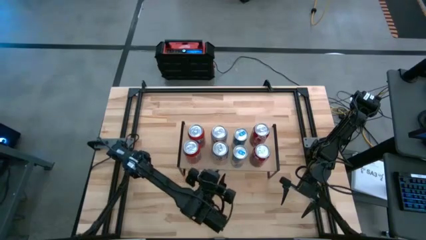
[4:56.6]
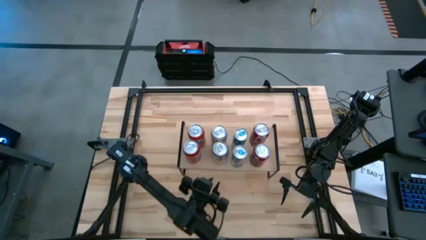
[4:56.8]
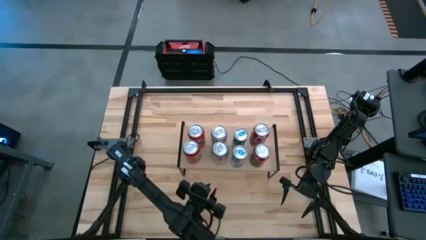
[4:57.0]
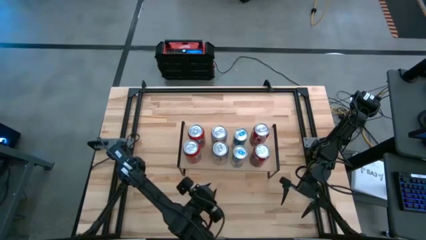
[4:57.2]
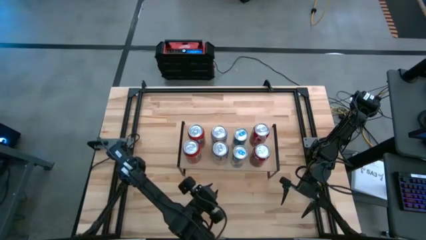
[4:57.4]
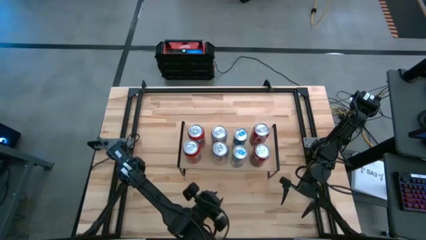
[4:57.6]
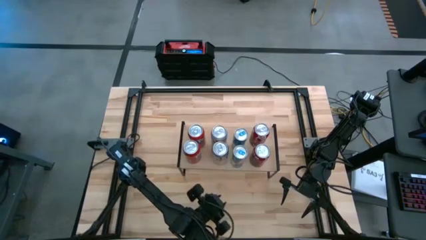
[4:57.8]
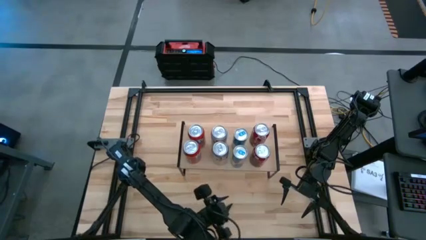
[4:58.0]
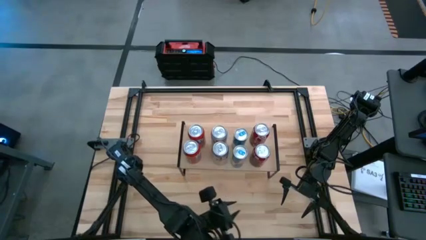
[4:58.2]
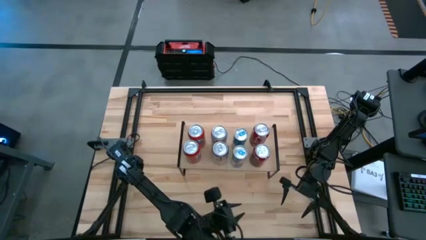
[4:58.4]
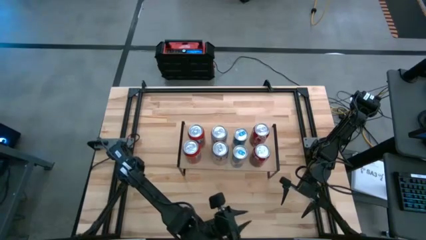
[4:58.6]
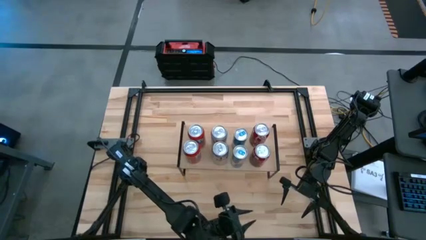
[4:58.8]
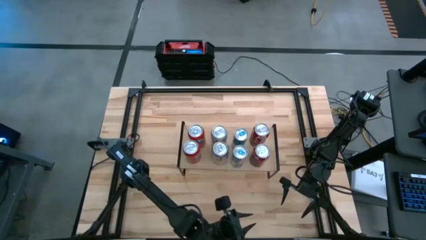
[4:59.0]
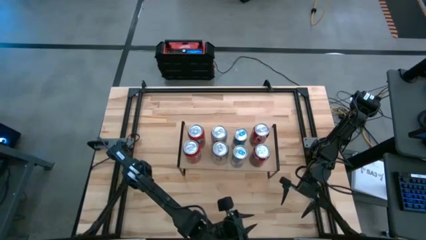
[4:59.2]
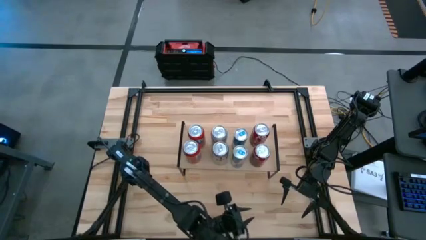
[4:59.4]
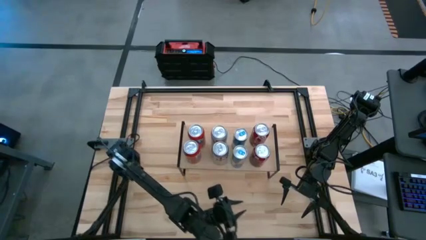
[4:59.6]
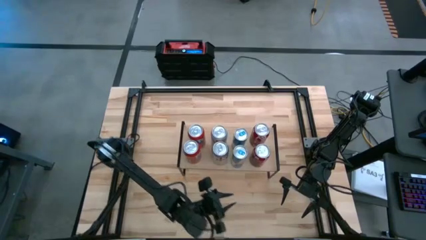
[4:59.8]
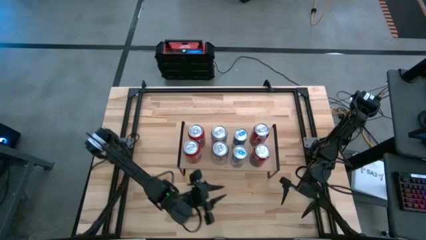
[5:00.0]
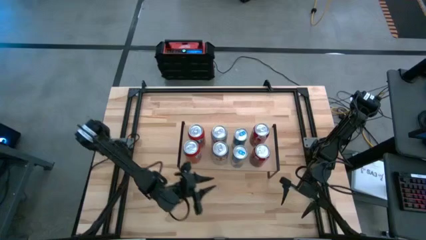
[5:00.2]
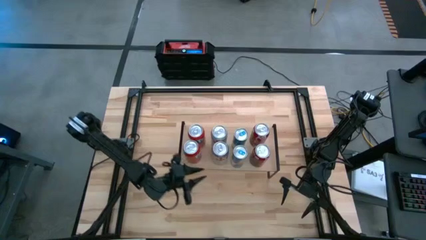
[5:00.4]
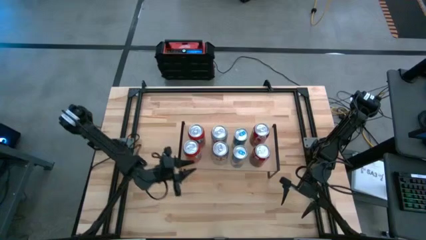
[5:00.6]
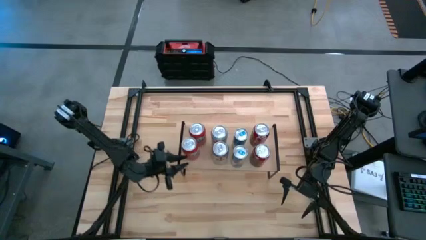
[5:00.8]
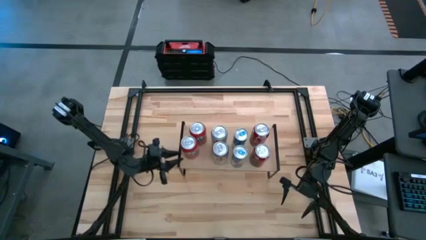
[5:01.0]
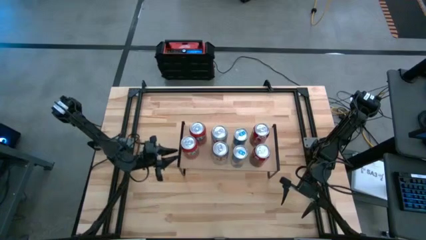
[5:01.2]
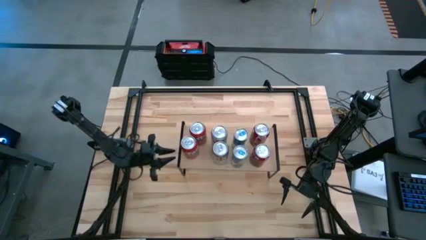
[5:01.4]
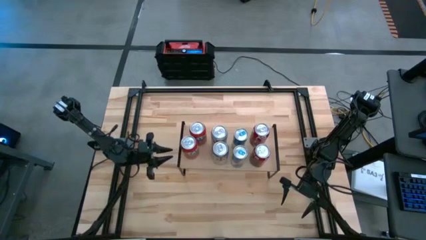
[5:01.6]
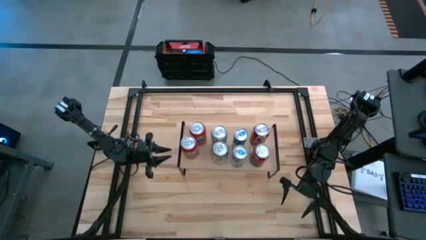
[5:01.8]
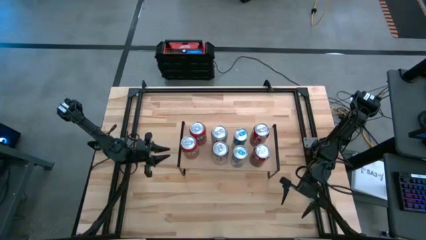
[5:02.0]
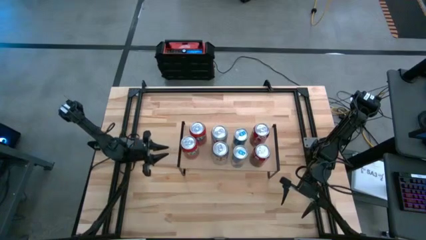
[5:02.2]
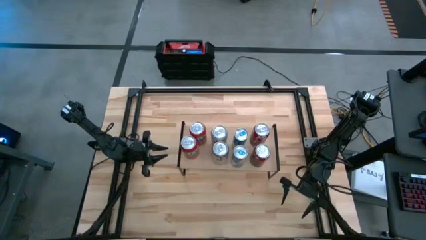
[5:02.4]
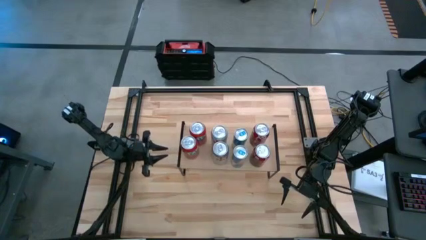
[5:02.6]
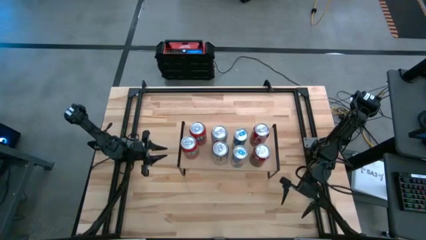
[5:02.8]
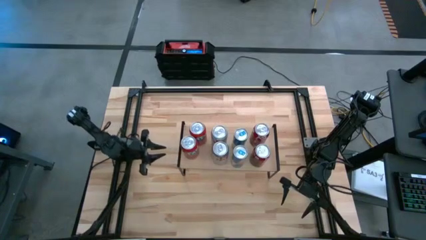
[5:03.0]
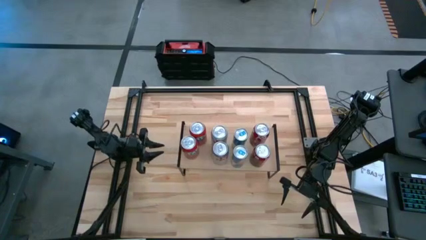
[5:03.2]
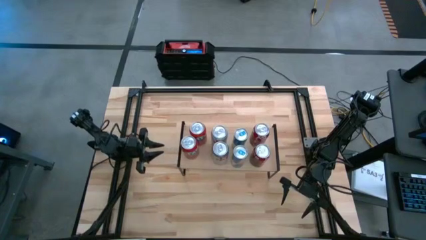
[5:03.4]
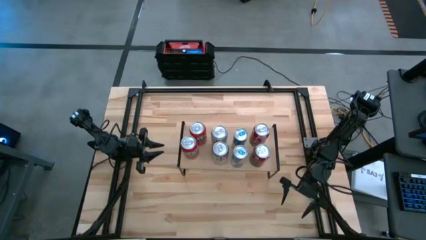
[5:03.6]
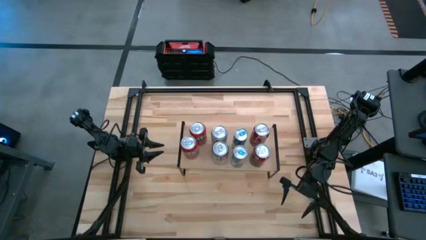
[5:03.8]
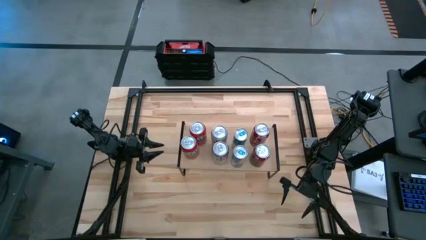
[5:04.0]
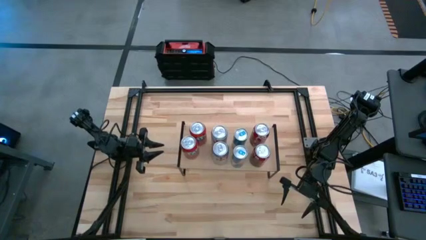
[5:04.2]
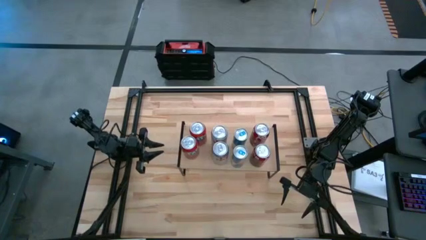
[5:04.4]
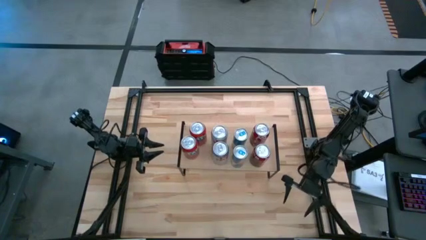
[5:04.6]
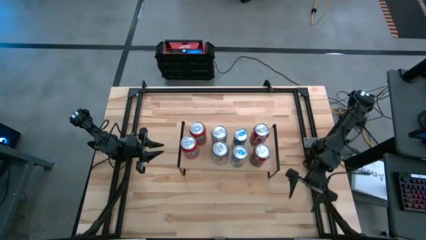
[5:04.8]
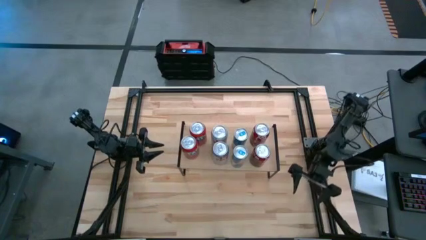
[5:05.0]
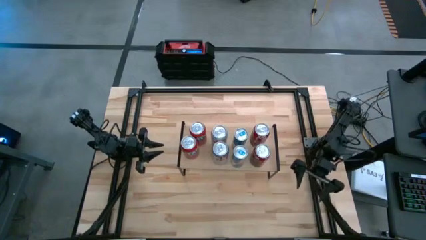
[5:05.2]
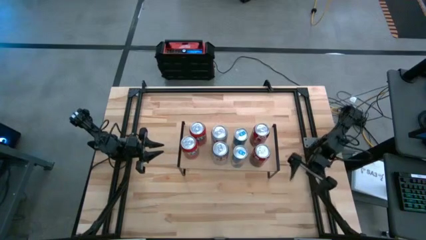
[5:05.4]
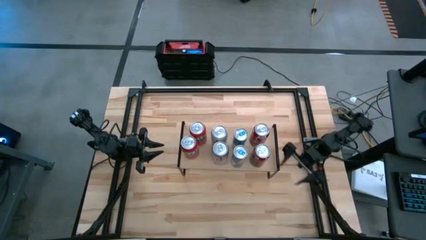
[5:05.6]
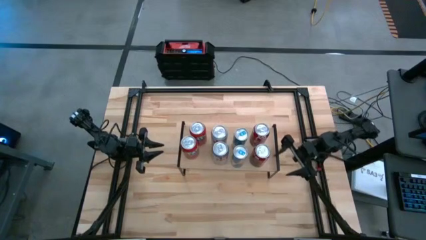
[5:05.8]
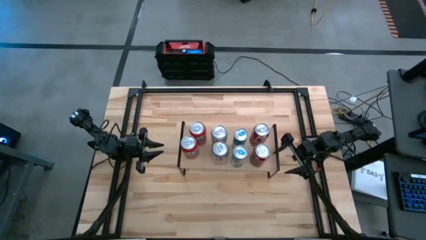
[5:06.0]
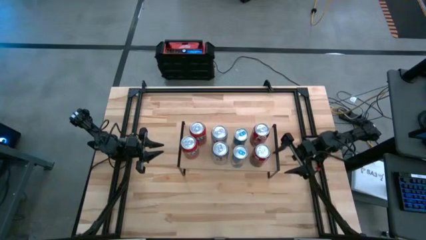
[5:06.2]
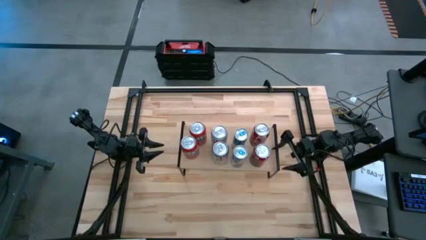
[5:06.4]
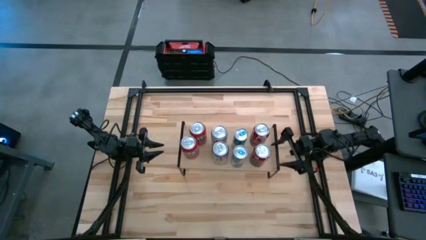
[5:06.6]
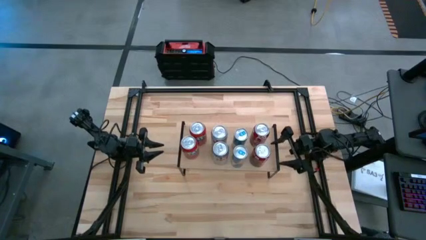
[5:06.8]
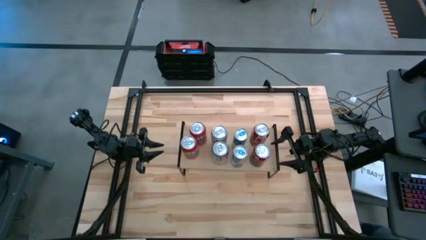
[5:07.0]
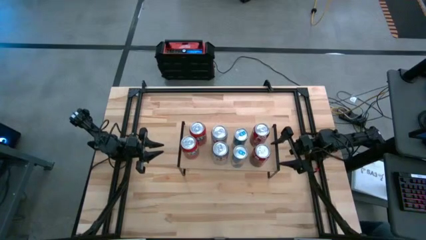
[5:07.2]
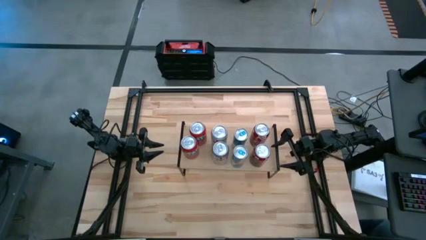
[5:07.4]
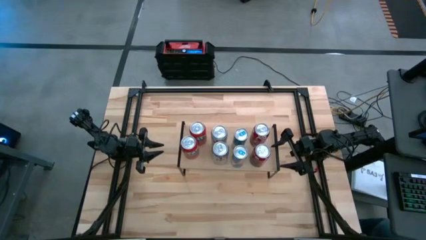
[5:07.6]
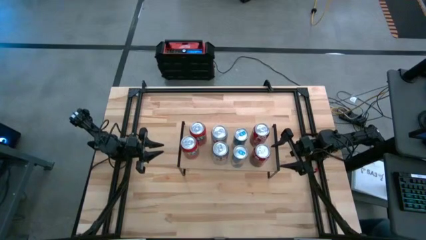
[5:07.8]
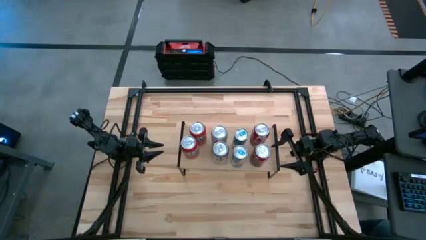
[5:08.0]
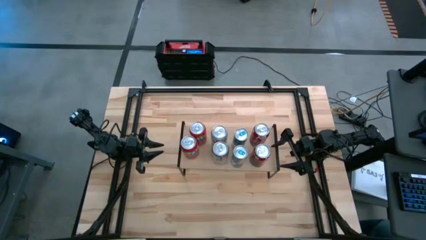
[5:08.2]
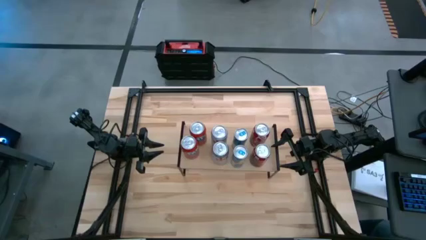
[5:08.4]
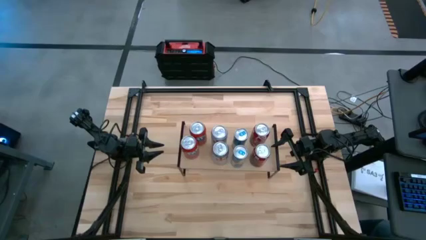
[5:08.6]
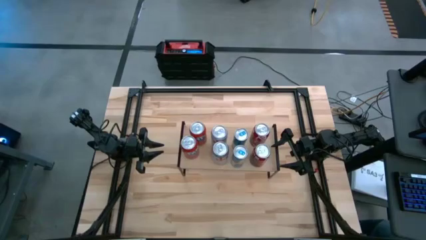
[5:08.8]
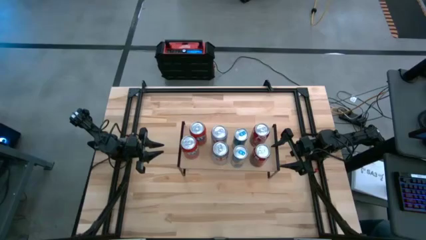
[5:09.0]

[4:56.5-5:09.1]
Task: Place canned beverage on shelf
Return to Home Position

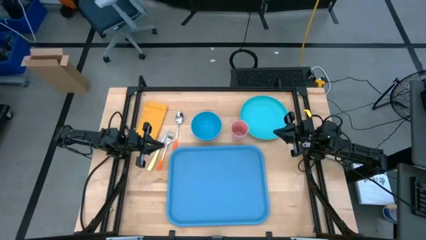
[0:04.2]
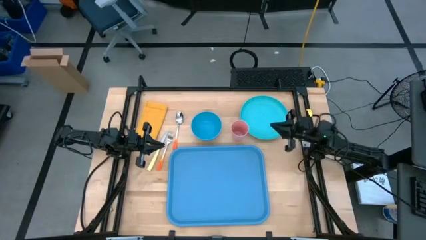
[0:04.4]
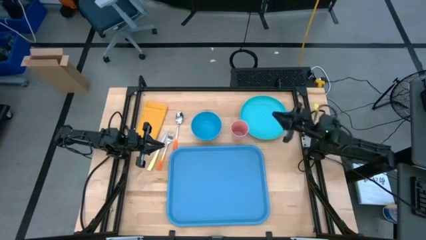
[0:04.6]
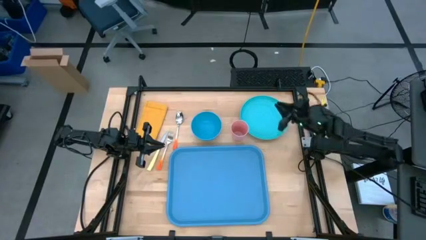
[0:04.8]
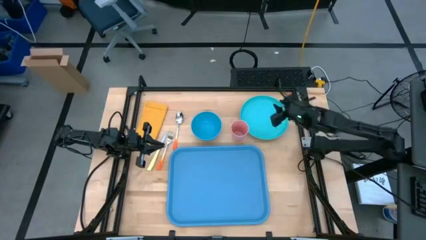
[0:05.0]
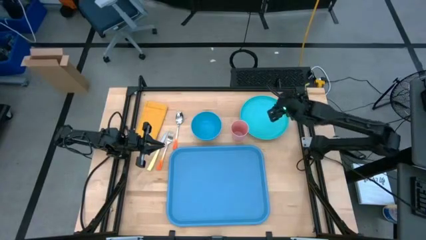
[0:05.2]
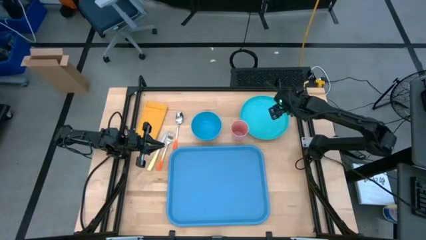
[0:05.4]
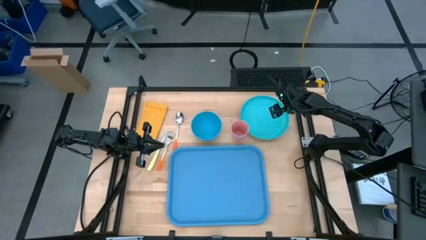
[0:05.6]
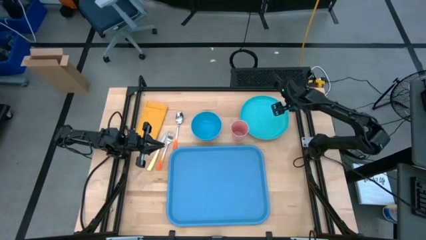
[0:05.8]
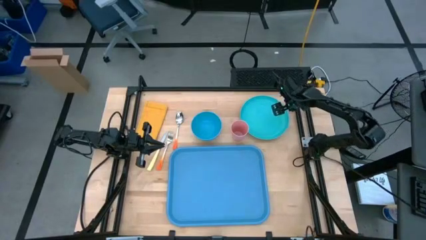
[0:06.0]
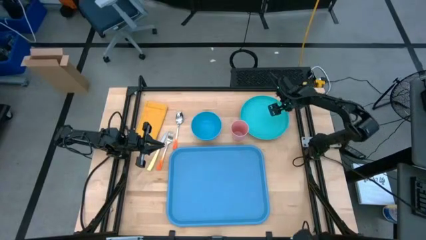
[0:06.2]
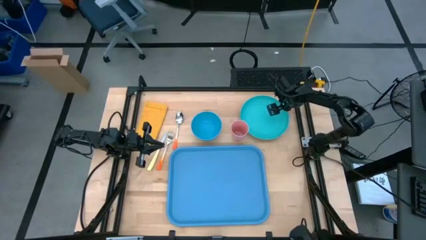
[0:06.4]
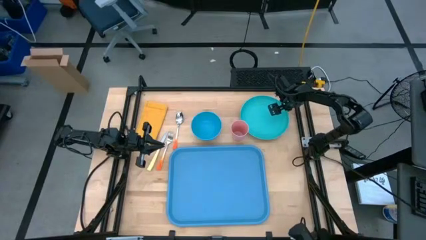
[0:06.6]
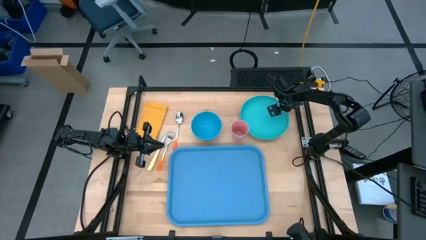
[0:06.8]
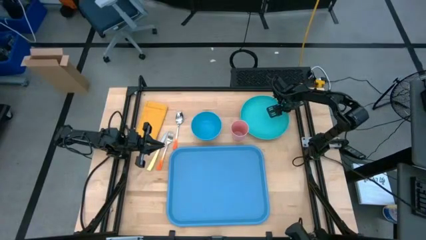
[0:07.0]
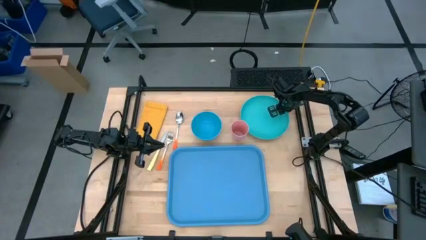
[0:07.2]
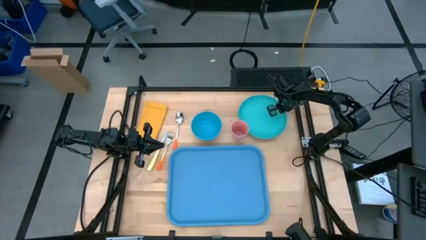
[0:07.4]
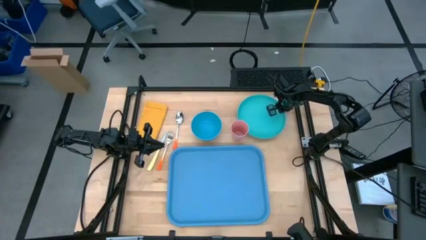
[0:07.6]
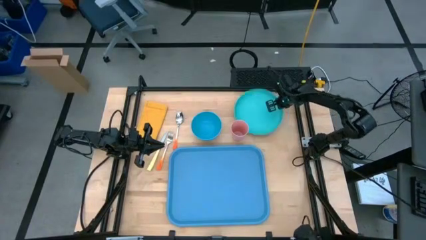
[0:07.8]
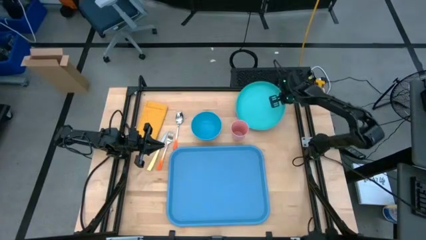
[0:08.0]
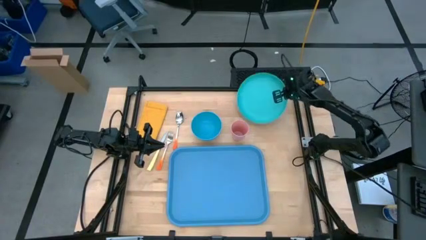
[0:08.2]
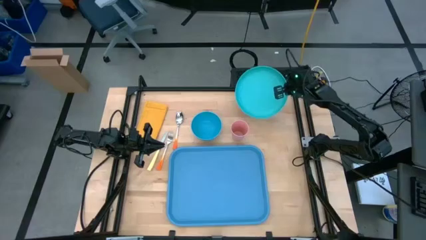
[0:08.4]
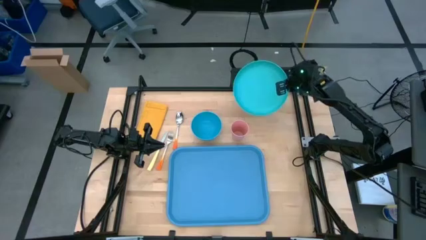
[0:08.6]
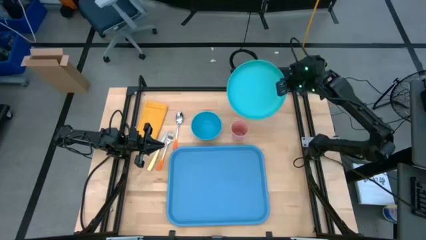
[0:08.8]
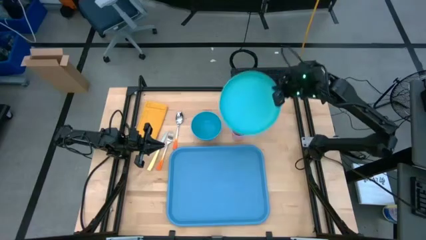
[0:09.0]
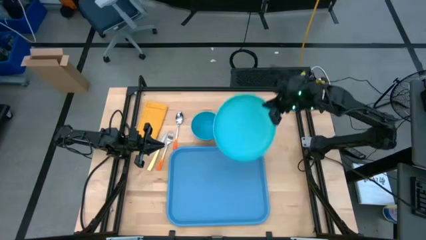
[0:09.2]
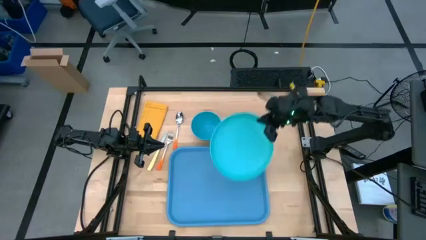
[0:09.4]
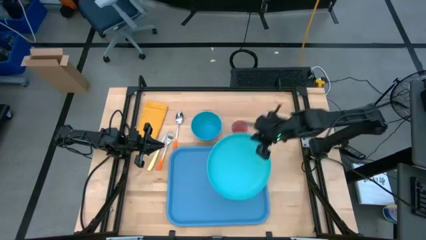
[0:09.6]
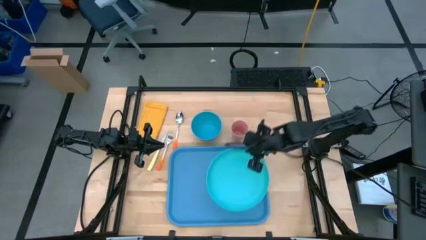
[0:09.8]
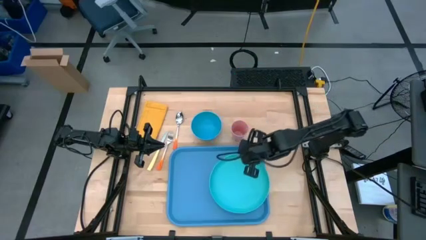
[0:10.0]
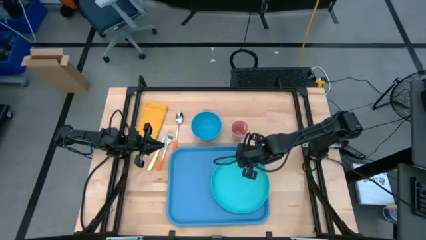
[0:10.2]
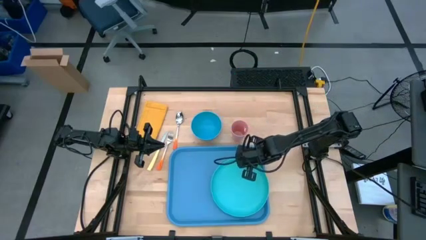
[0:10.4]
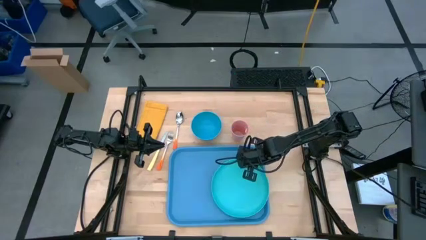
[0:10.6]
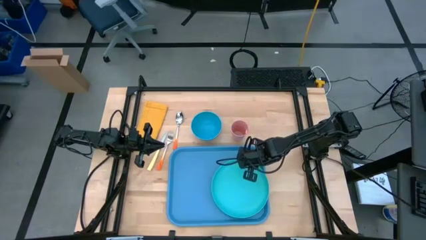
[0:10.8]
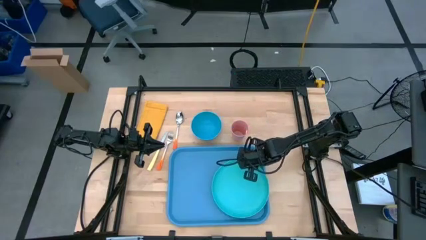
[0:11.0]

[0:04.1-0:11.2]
Task: Set up tray
Put the light blue plate on the blue serving tray
